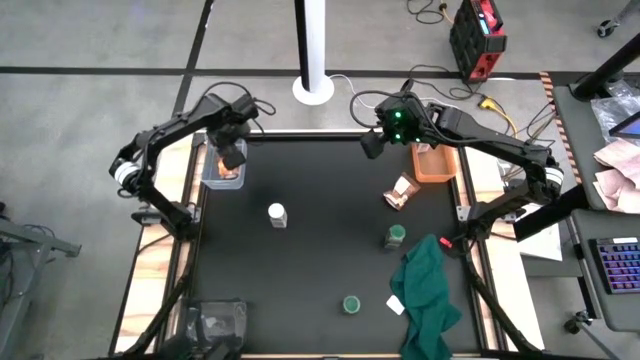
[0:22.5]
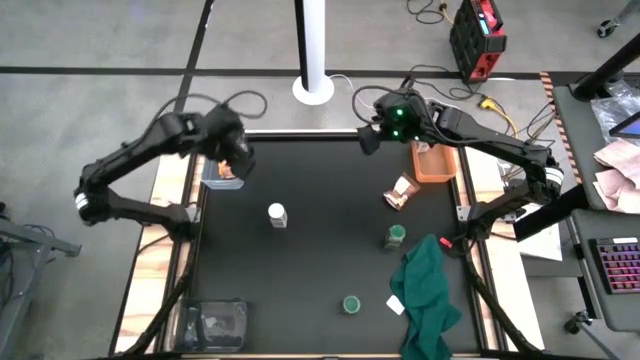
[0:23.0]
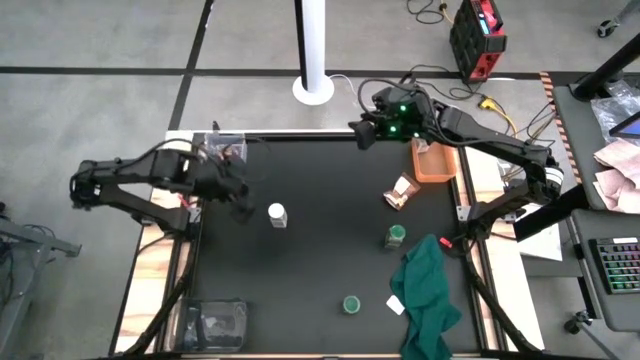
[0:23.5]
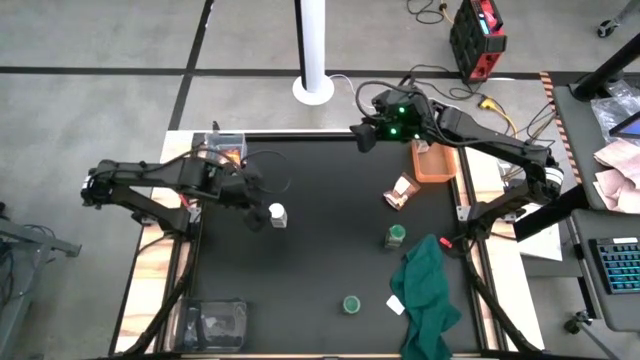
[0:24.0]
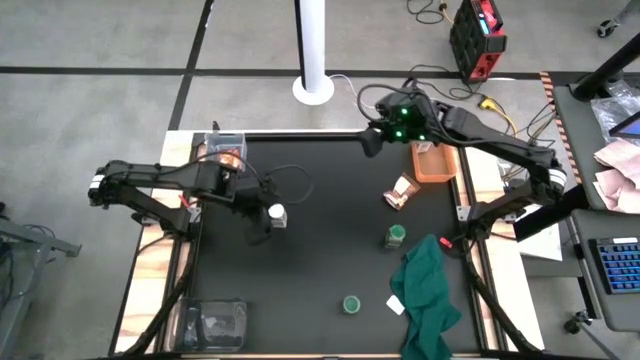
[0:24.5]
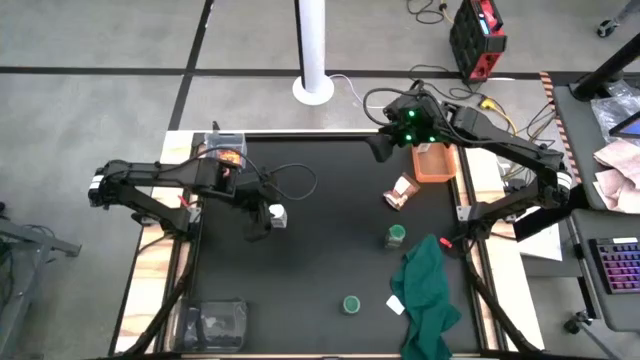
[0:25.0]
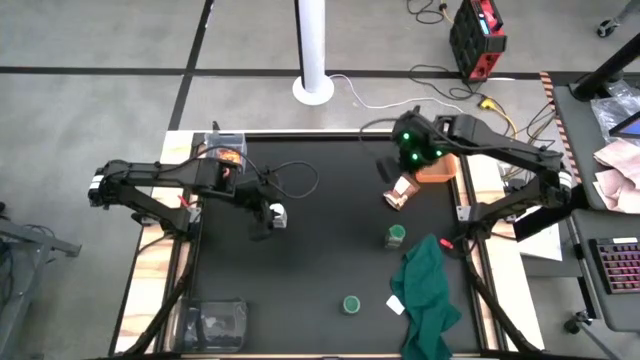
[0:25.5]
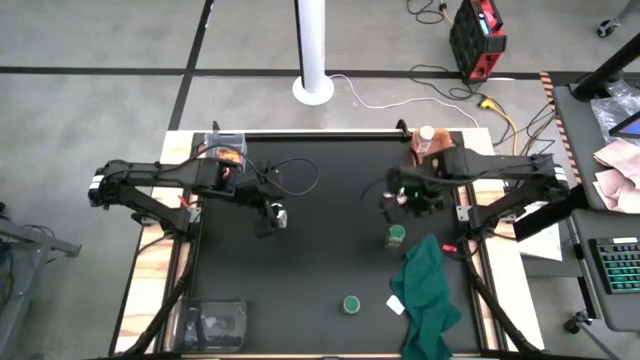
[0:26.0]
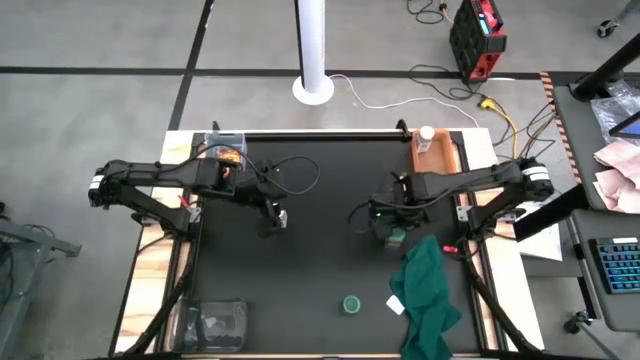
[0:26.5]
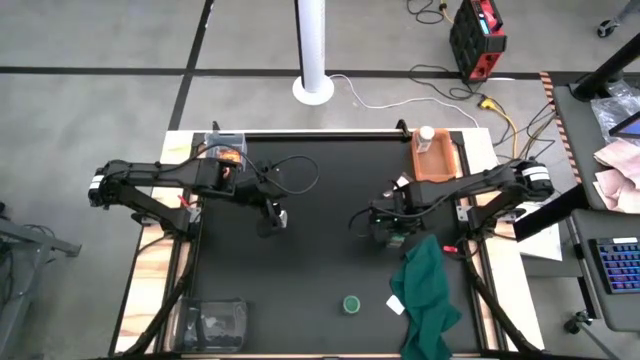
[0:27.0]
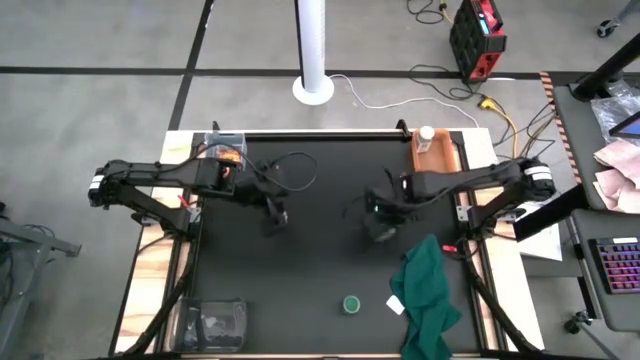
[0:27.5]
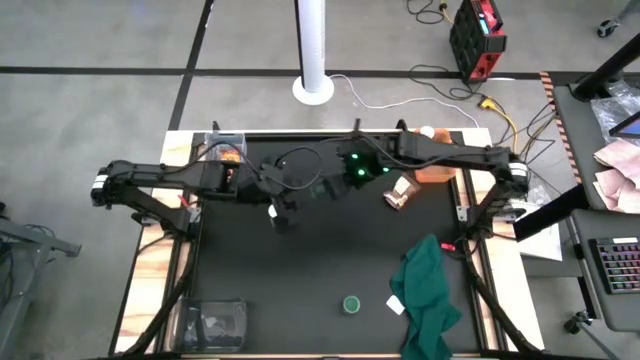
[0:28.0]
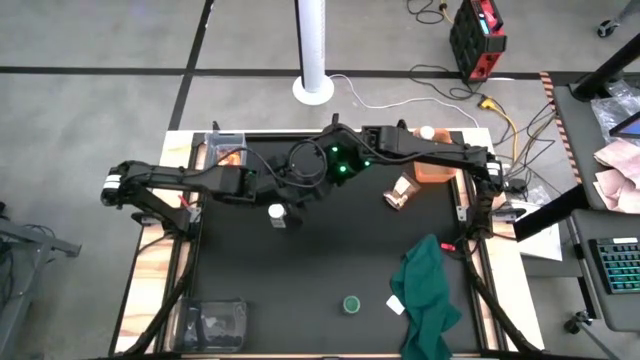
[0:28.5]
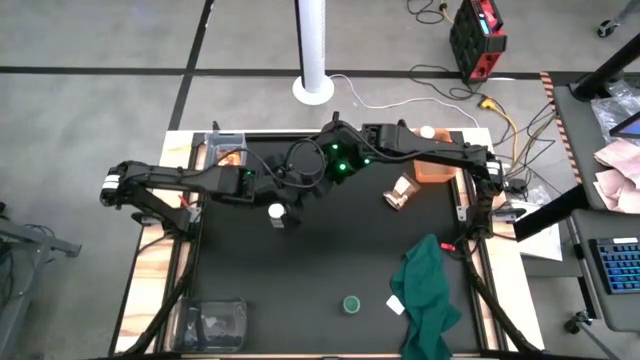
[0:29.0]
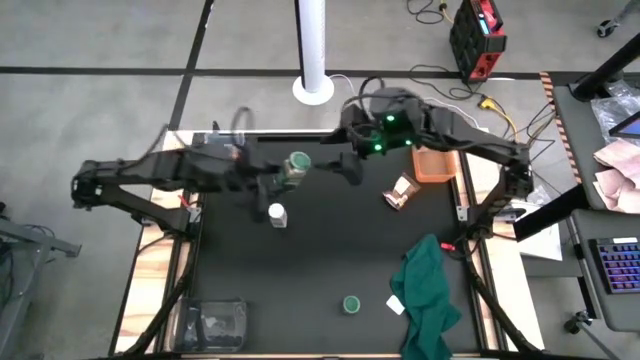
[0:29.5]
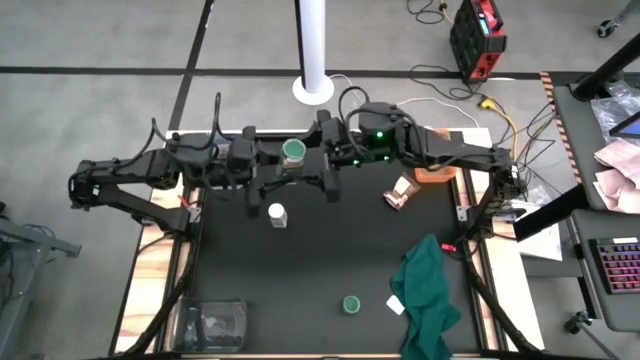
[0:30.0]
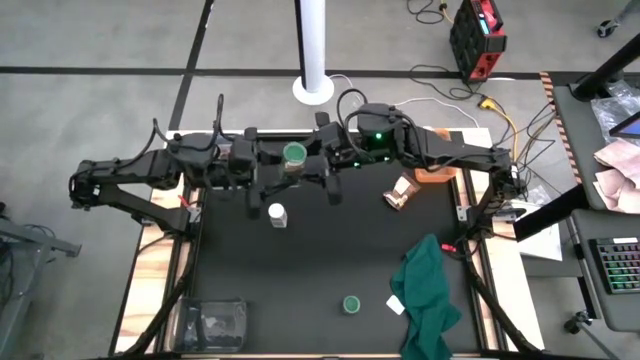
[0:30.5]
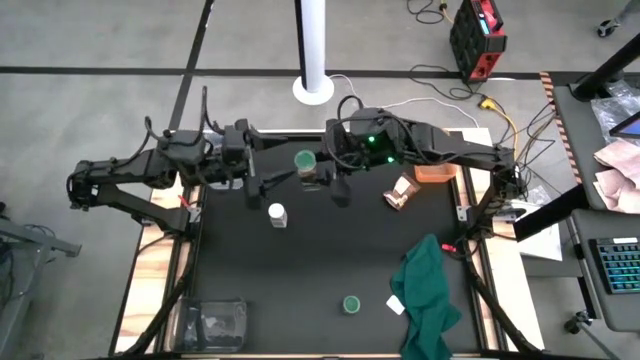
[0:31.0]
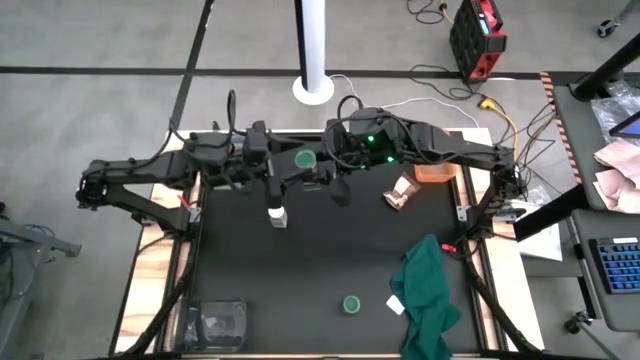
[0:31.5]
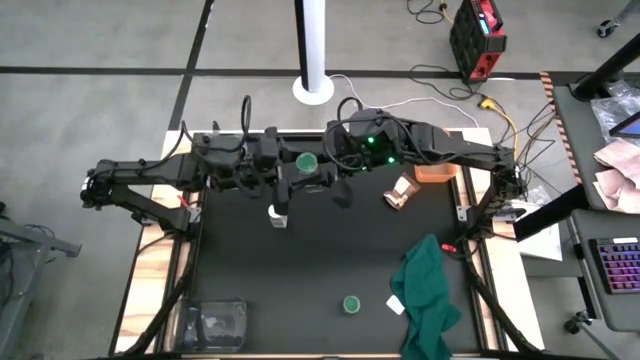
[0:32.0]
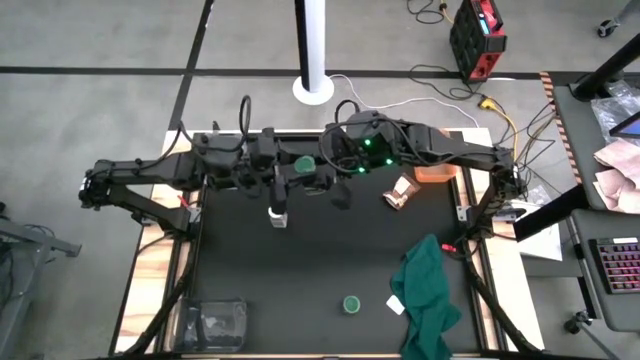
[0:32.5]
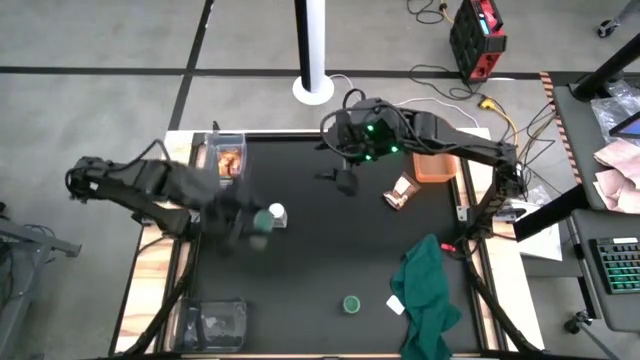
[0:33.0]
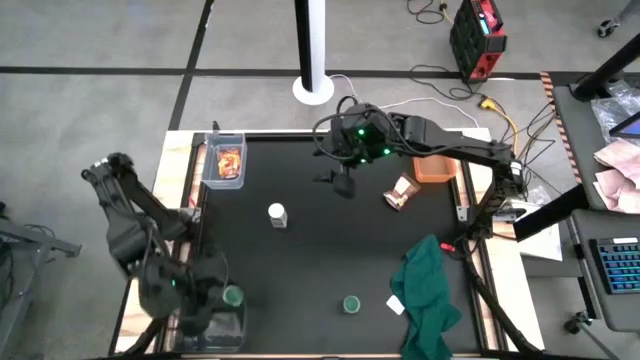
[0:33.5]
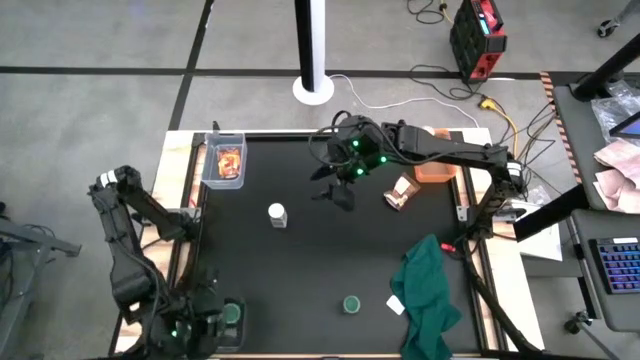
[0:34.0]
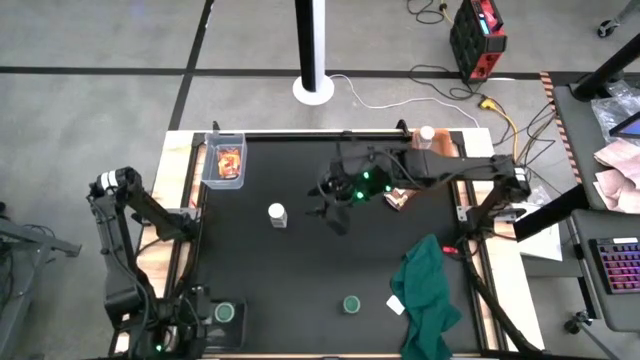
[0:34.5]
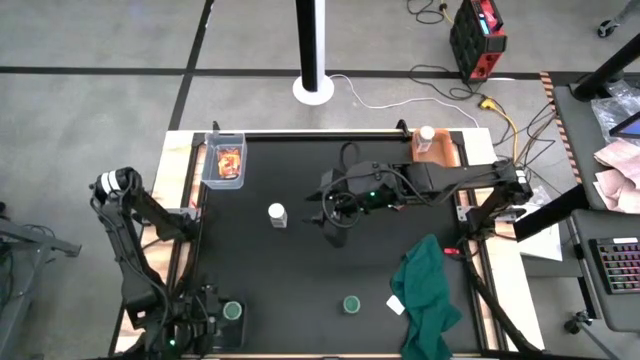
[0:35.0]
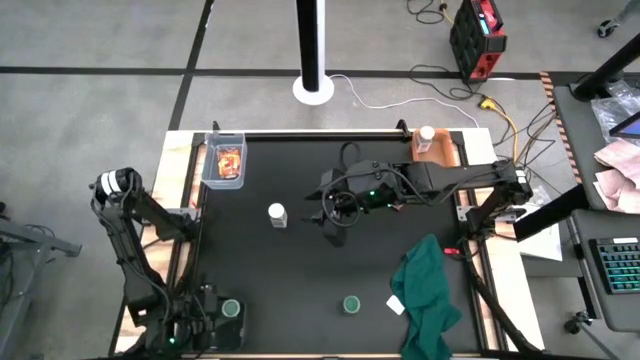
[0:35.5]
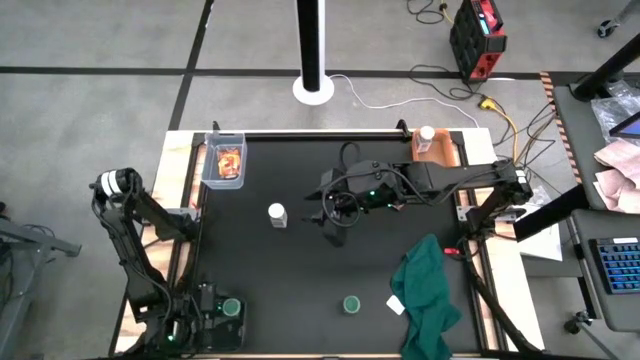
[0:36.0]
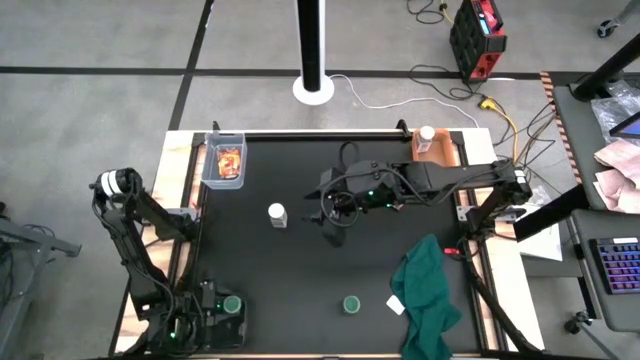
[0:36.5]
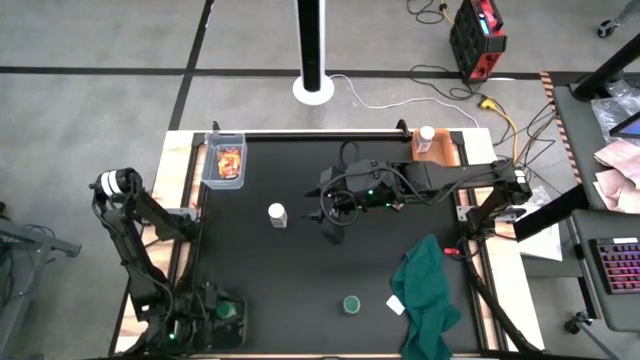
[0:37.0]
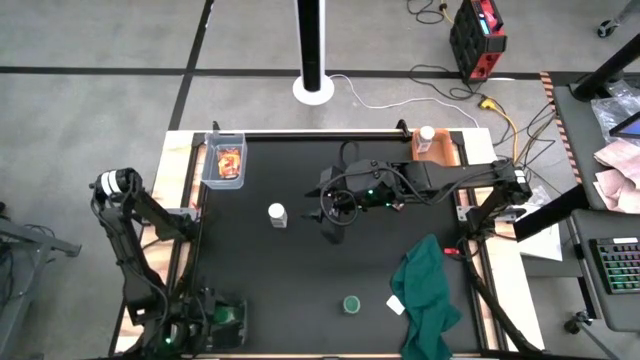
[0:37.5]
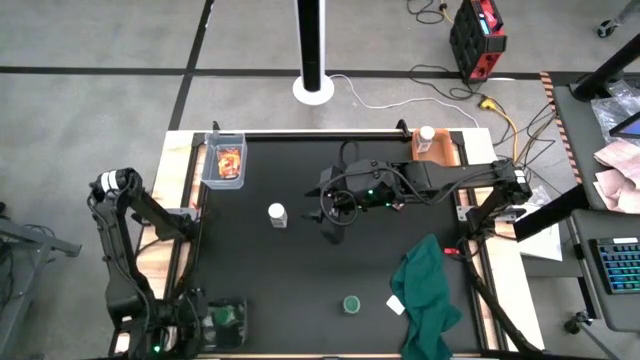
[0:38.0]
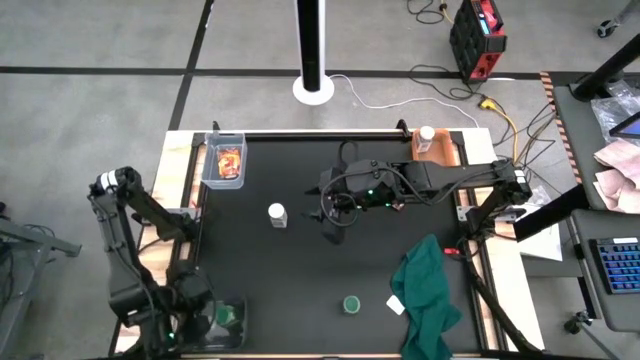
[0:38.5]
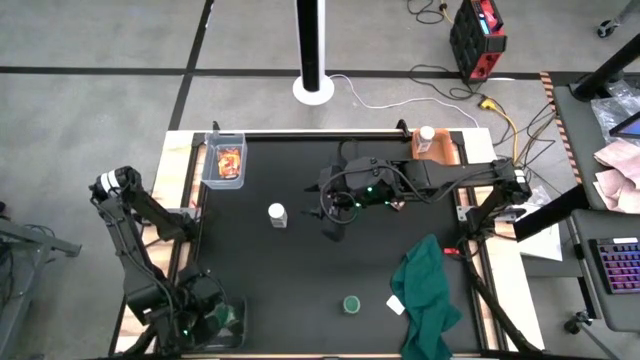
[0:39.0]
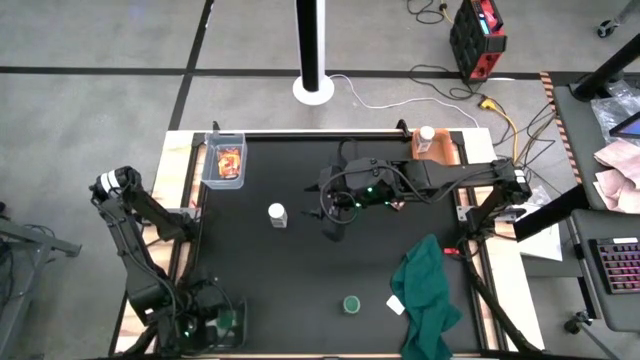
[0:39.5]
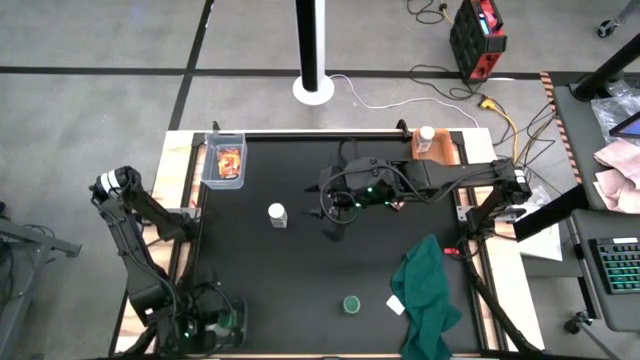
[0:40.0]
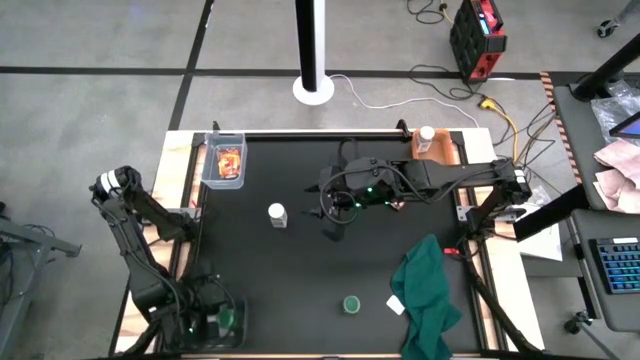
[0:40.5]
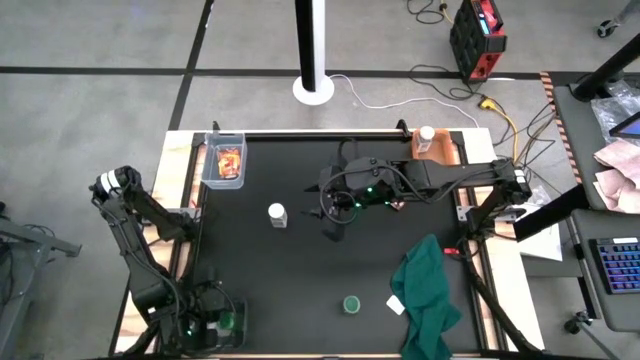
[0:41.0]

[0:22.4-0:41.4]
Task: Sort spices by type
Put the top green seasoning bottle into the black bin
